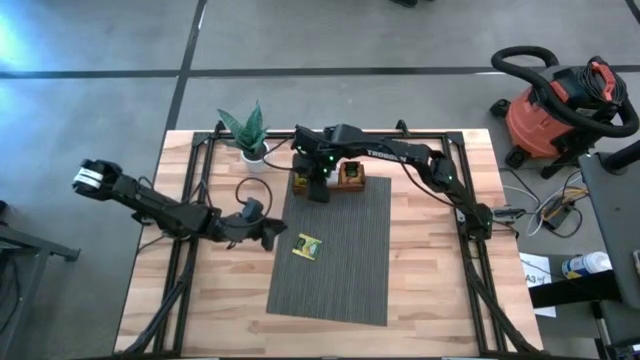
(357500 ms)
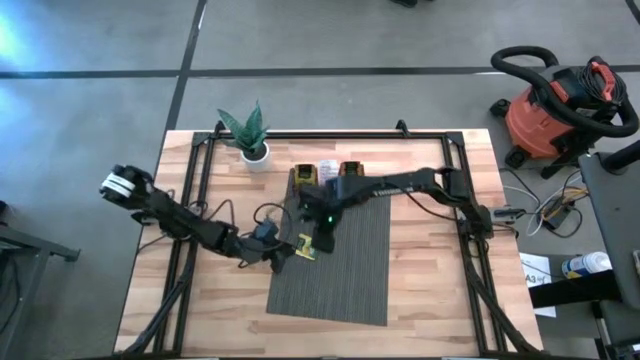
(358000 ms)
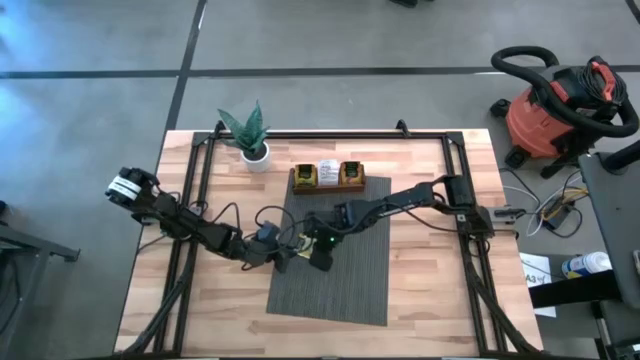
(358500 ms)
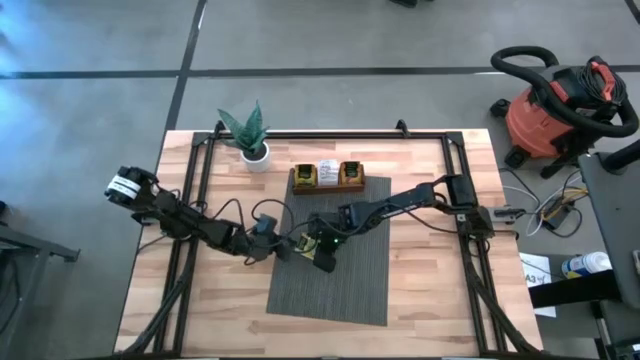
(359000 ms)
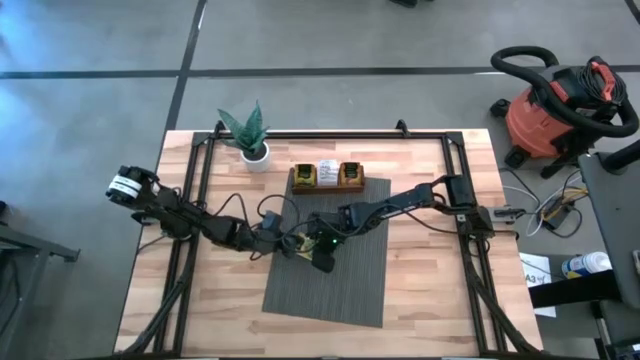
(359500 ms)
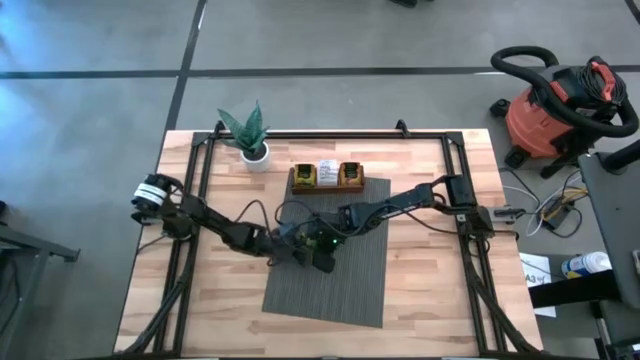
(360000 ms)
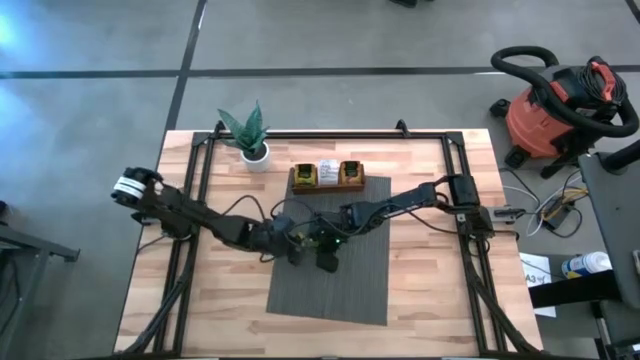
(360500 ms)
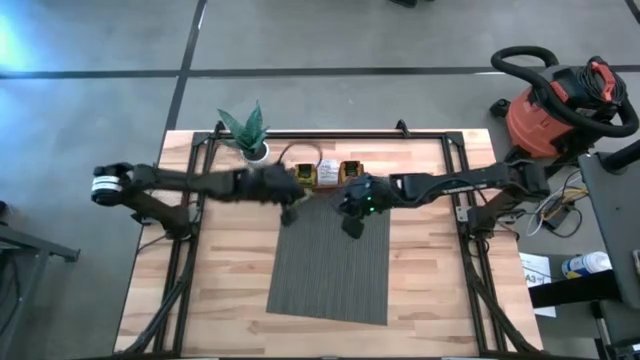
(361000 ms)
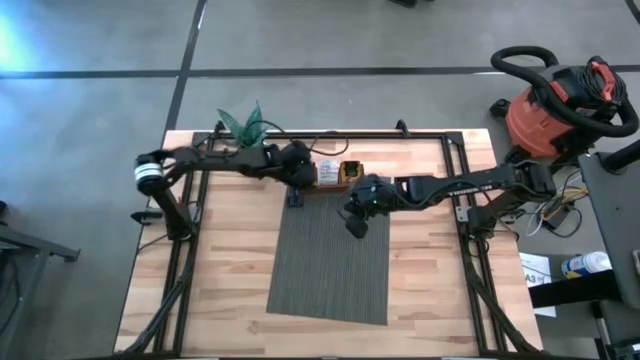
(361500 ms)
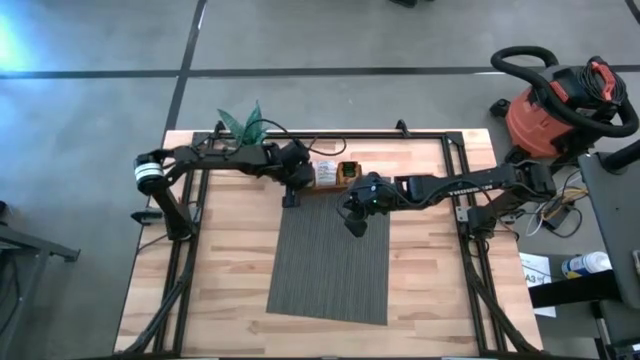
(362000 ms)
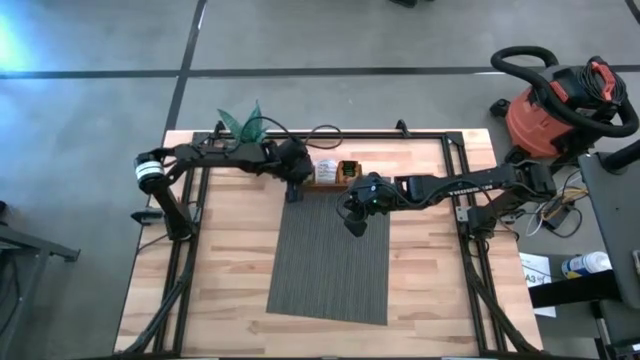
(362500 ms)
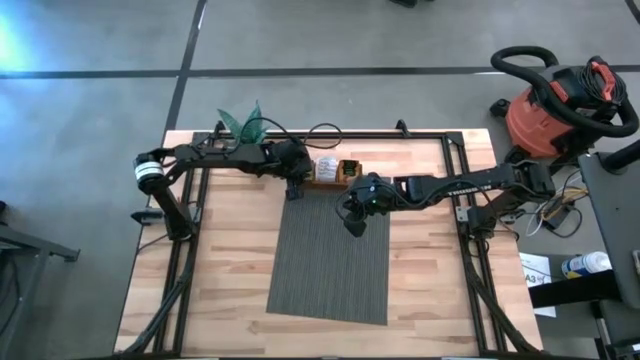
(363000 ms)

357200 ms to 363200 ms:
Task: Pick & Place Tea
Put the yellow tea bag into the left compartment of the wooden organizer

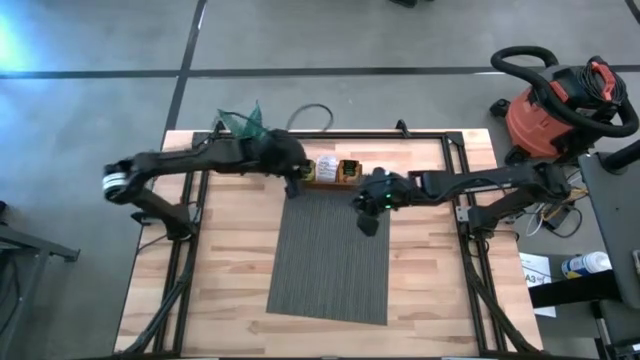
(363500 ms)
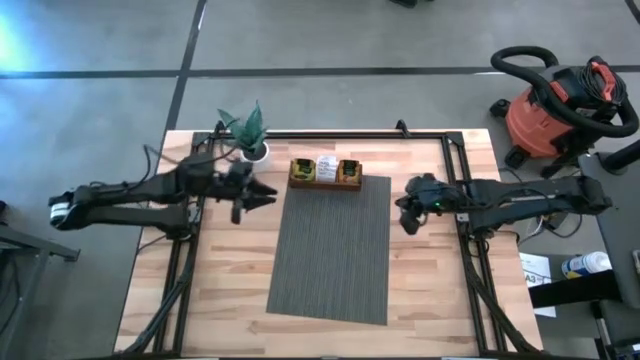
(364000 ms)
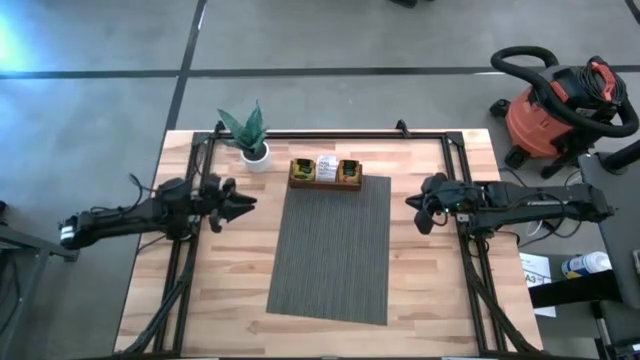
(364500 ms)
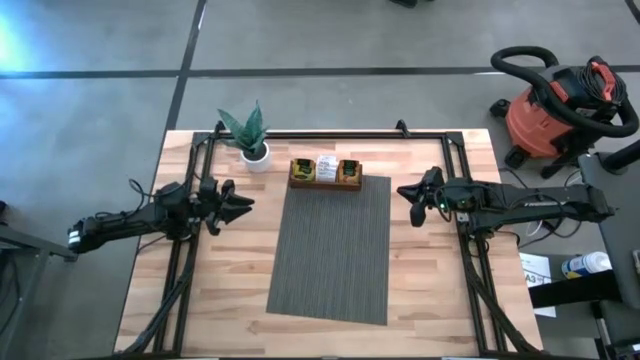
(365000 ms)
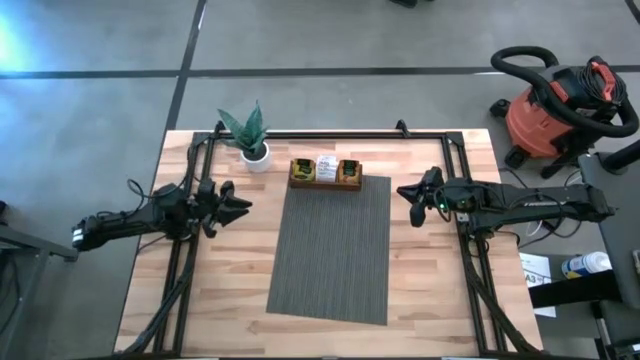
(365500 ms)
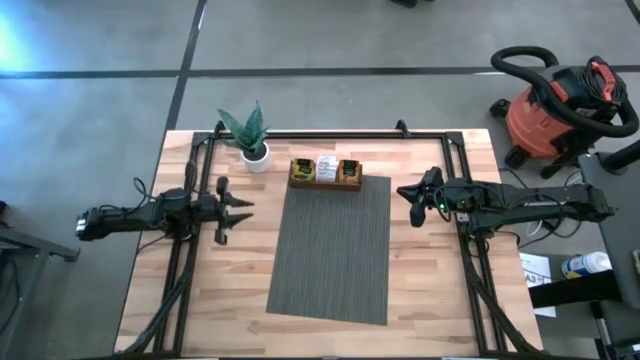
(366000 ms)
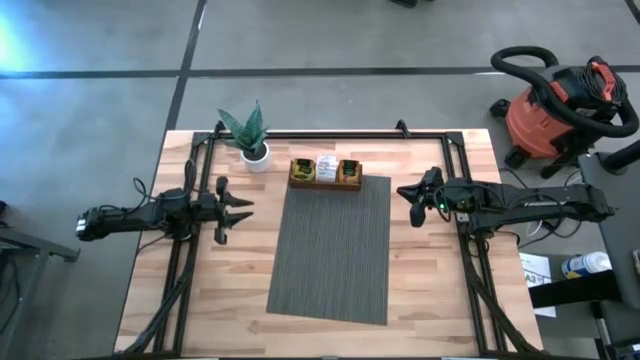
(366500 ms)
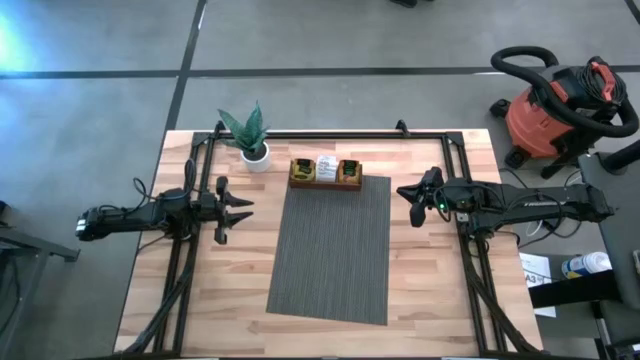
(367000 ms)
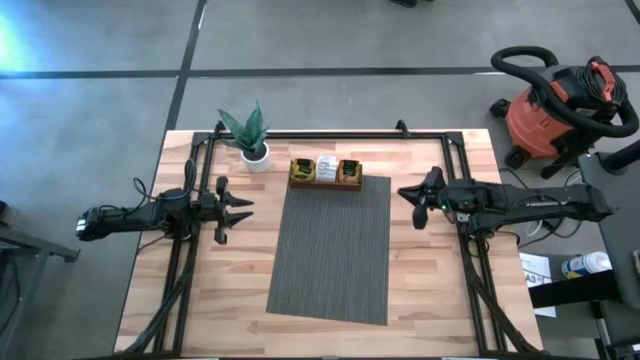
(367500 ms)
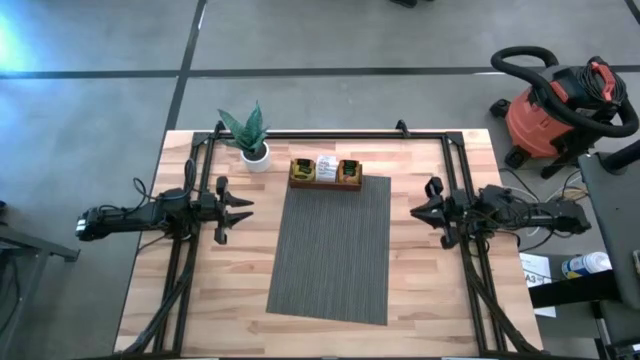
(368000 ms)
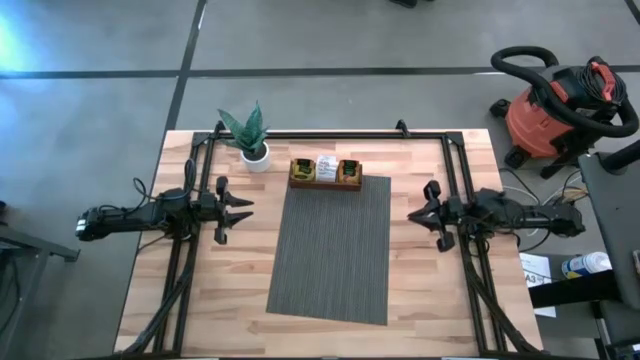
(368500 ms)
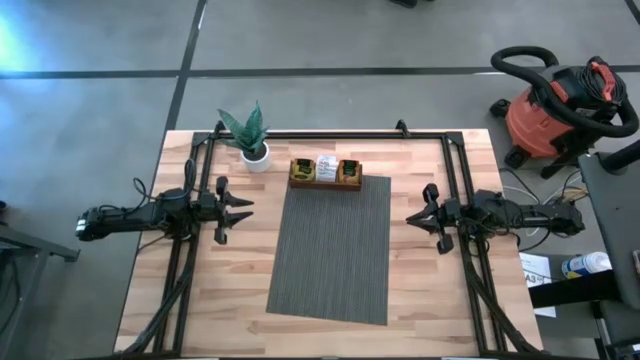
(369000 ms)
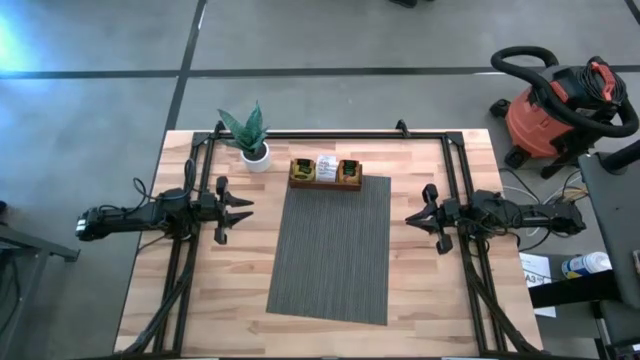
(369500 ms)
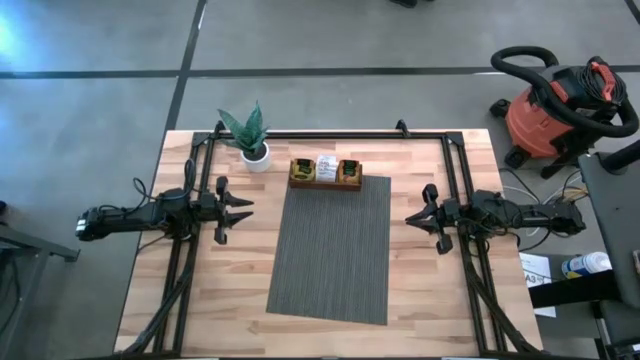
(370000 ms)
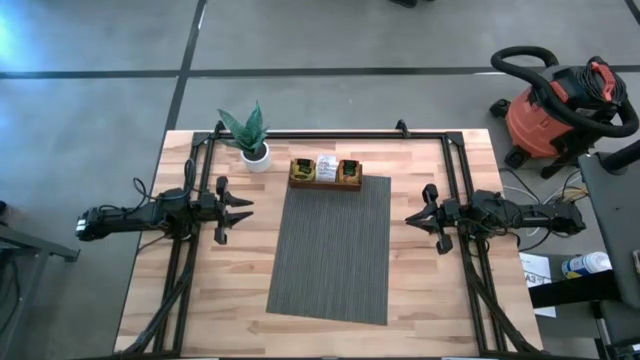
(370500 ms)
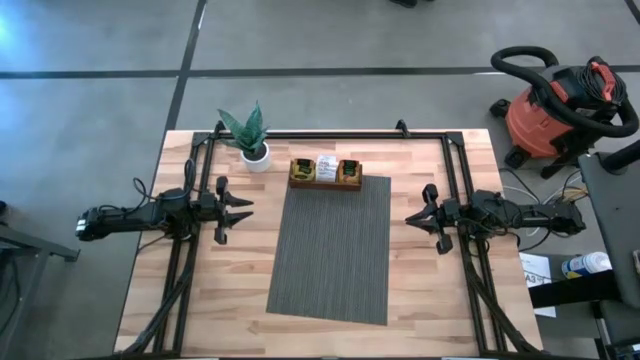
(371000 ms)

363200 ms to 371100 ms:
Return to Home Position

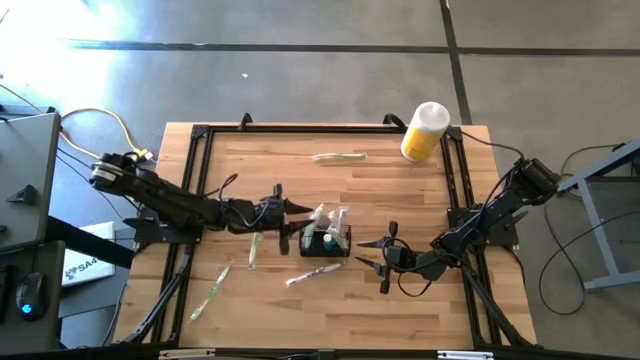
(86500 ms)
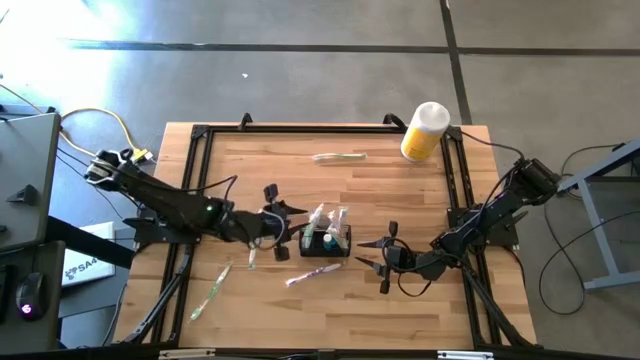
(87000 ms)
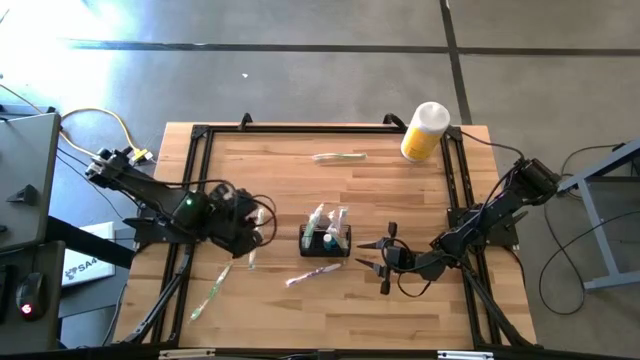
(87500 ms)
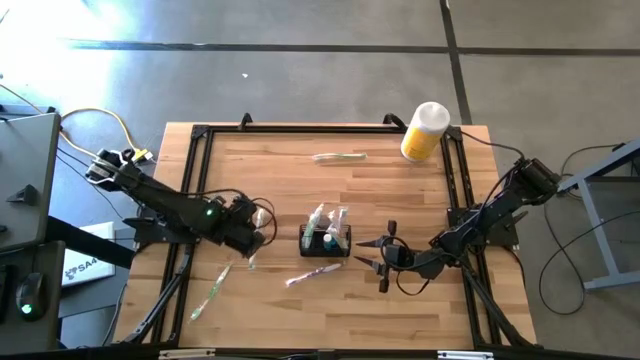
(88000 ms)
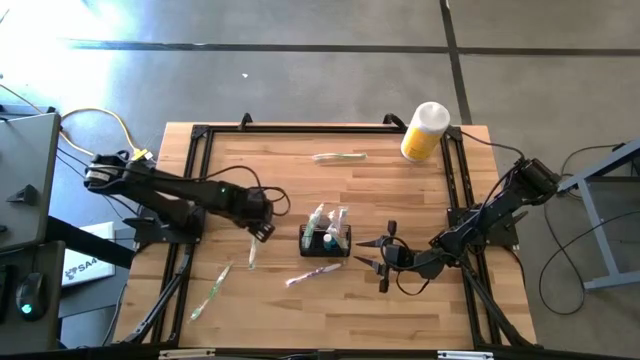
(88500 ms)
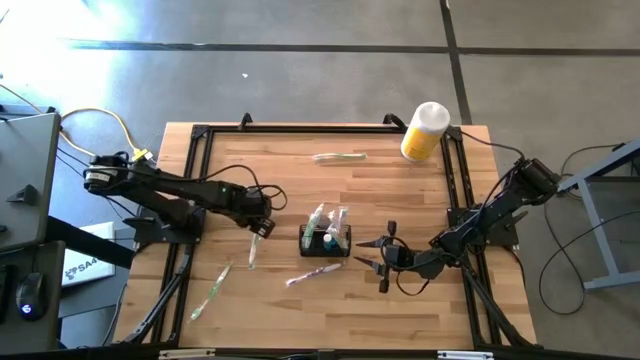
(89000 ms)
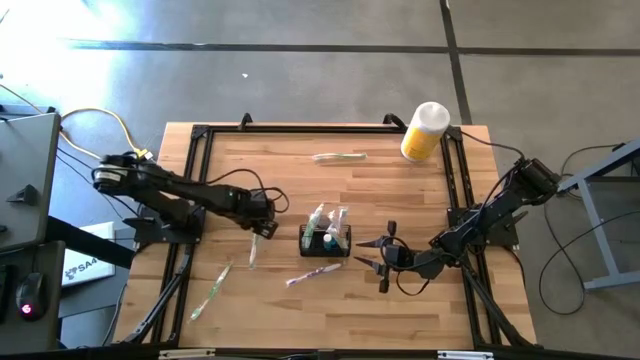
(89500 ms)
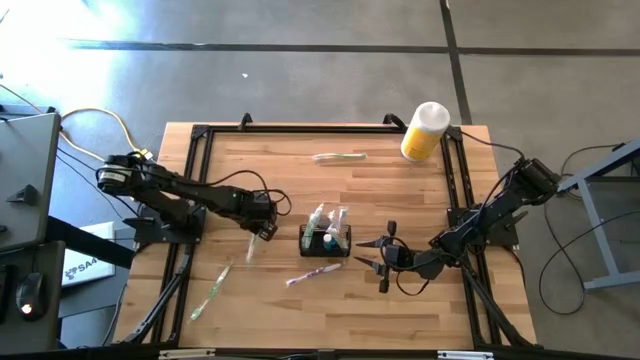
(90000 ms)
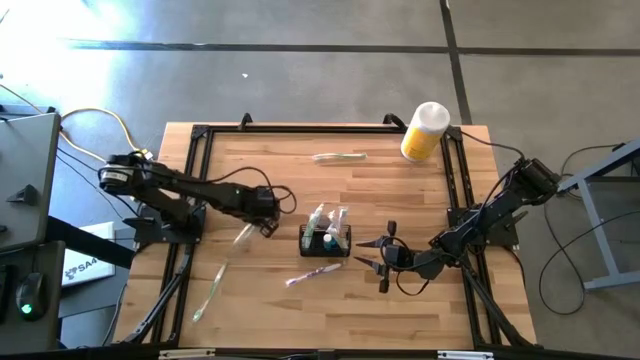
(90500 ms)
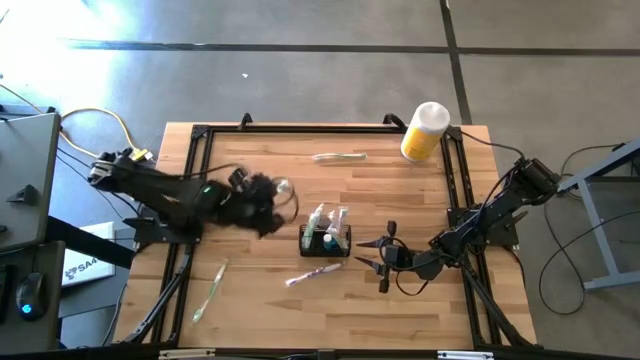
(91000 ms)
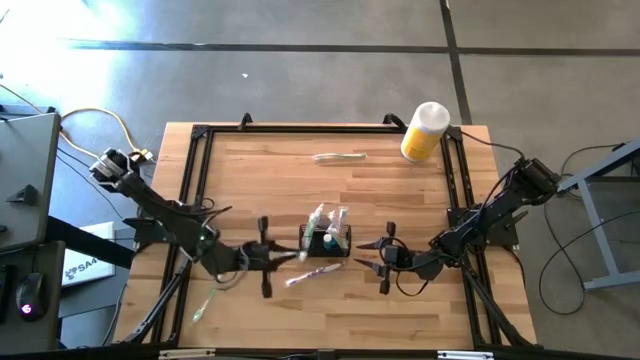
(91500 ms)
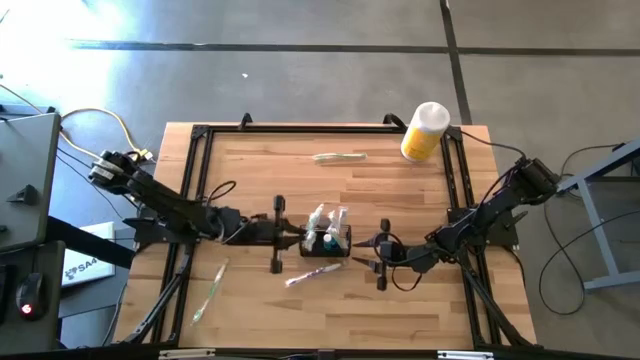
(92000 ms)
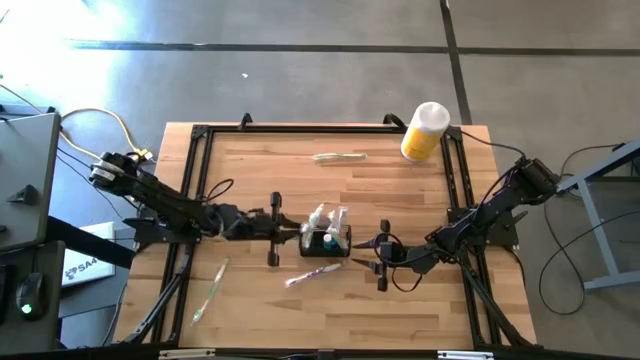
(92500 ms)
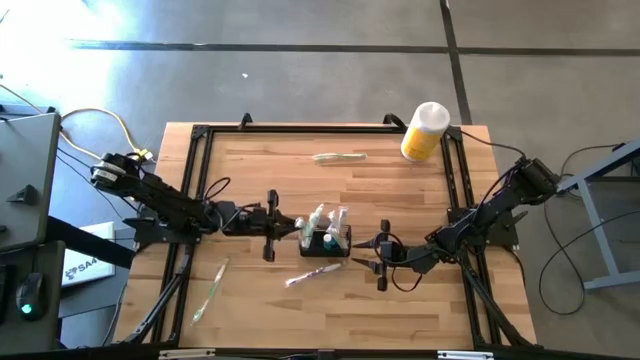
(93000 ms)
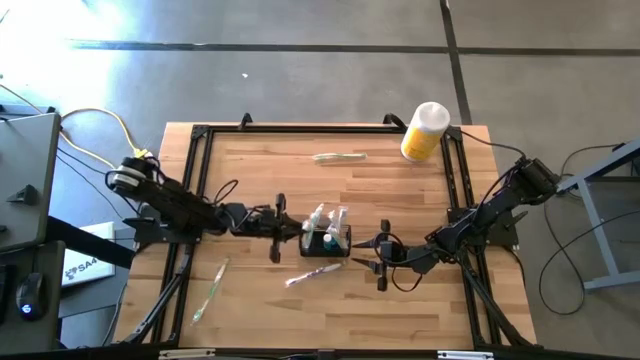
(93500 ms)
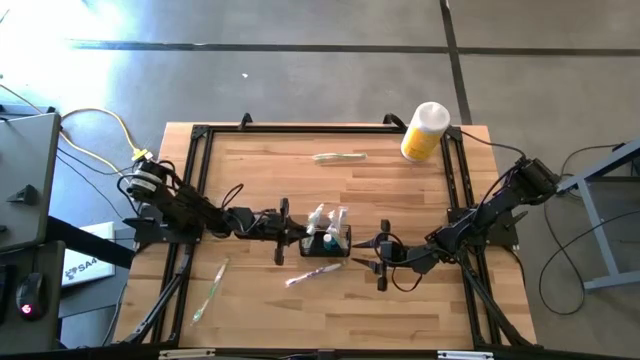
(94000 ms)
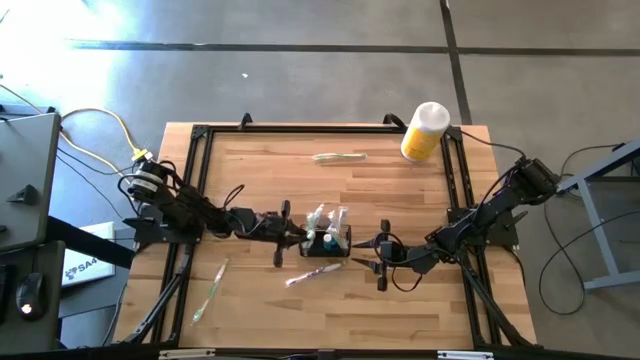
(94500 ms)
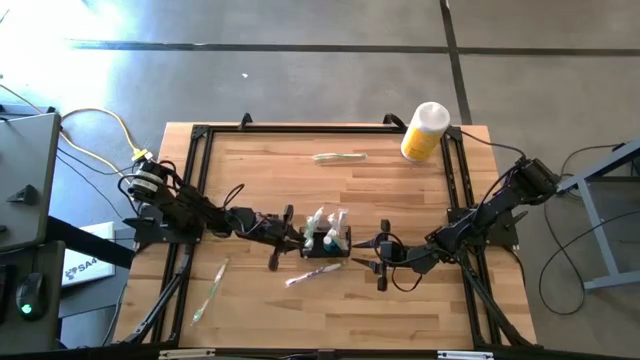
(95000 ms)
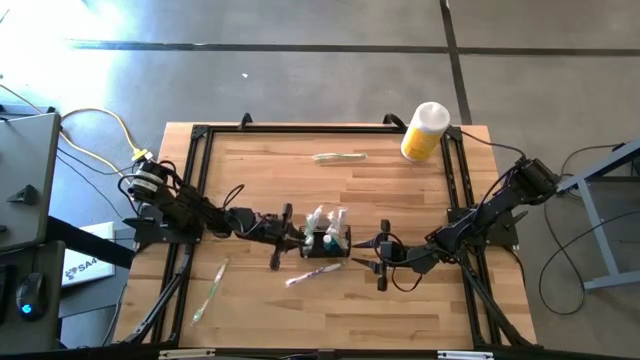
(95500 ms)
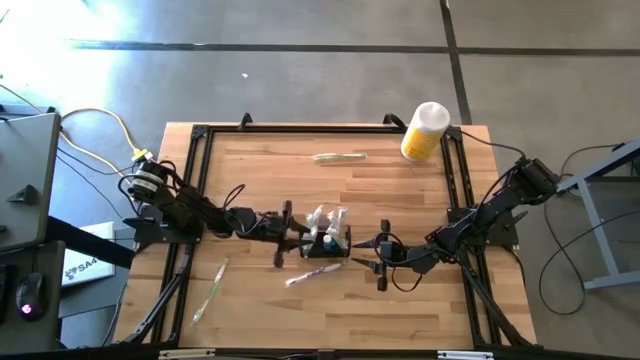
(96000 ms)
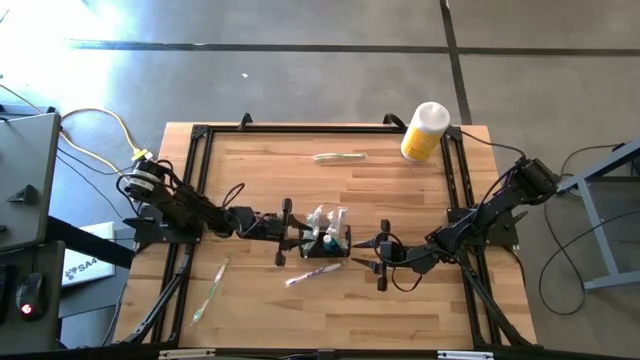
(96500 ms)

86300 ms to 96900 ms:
Task: Pick & Place toothbrushing station
Put the green toothbrush into the black wire organizer
